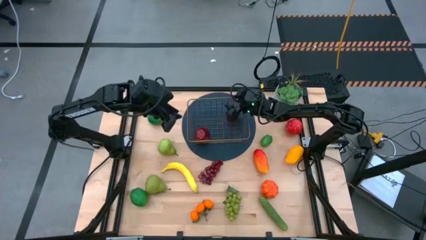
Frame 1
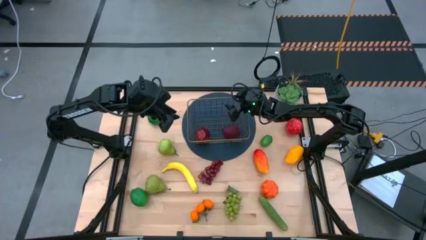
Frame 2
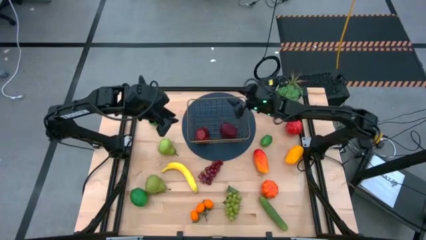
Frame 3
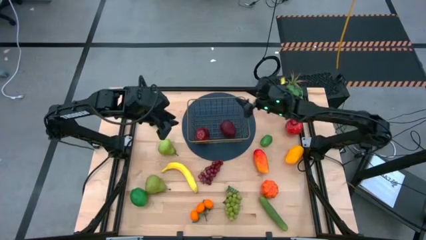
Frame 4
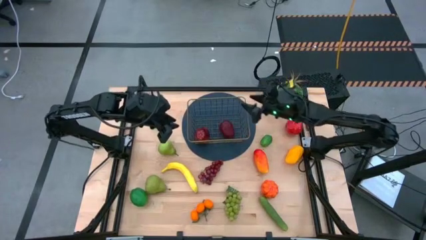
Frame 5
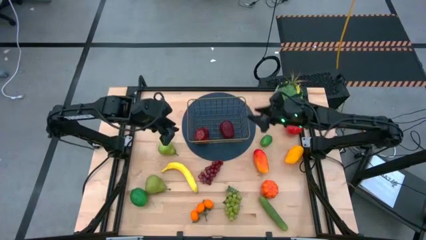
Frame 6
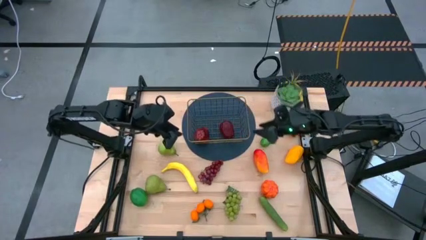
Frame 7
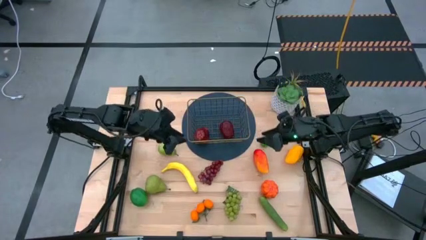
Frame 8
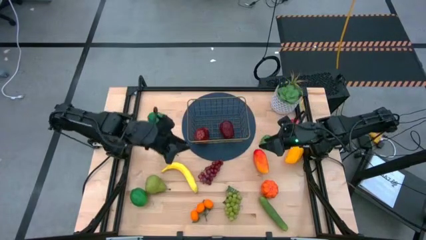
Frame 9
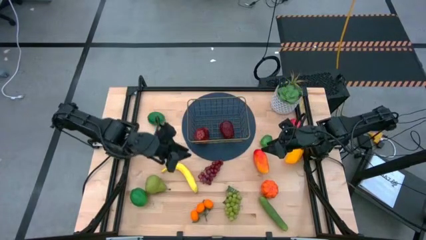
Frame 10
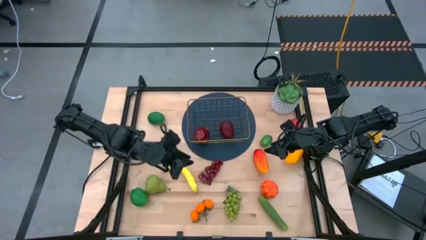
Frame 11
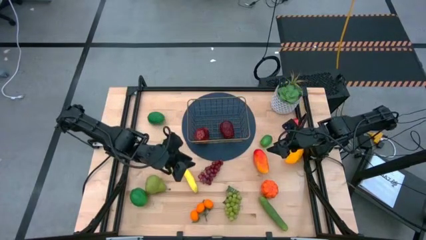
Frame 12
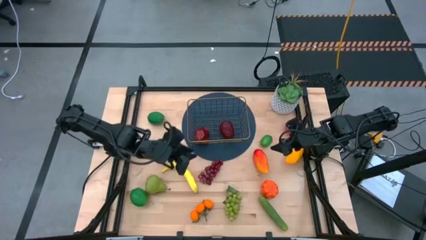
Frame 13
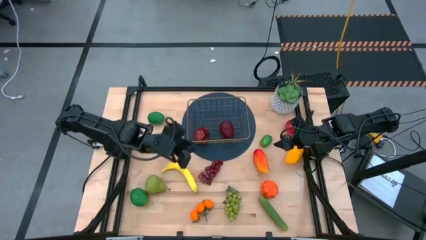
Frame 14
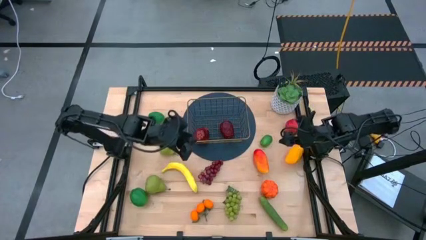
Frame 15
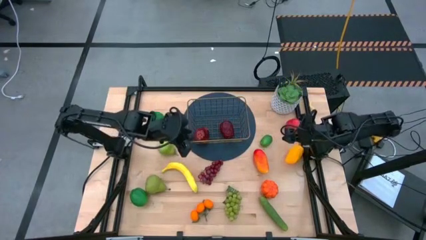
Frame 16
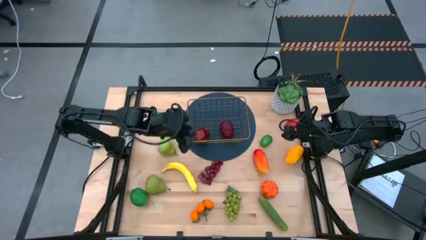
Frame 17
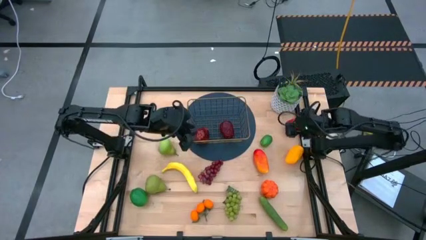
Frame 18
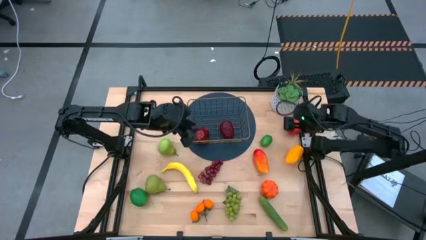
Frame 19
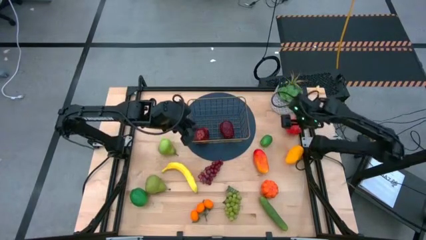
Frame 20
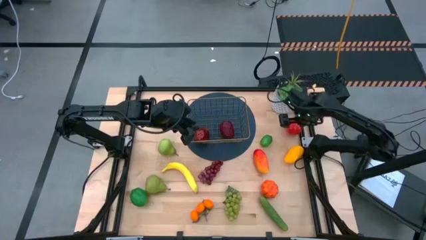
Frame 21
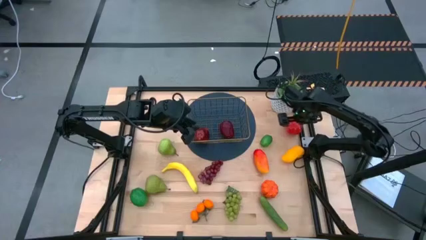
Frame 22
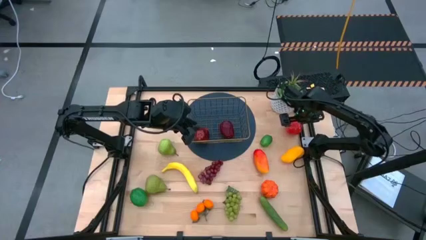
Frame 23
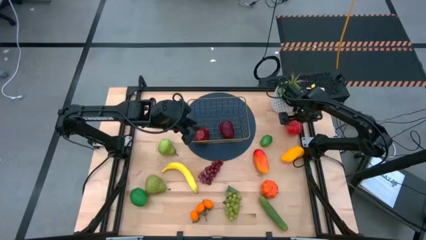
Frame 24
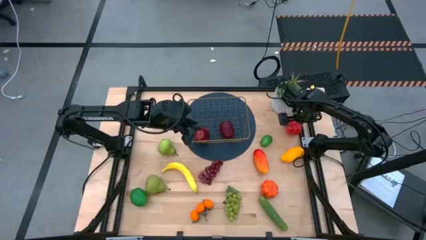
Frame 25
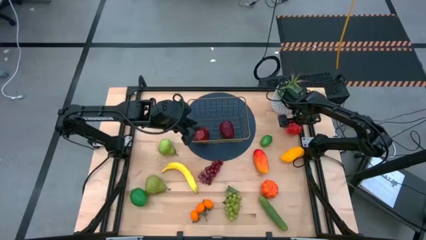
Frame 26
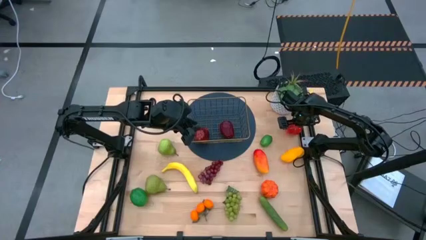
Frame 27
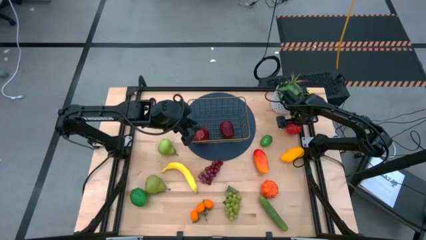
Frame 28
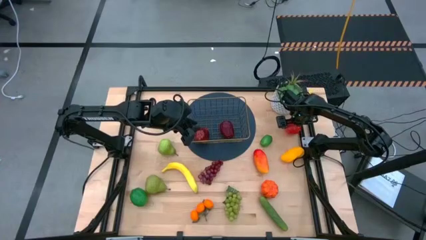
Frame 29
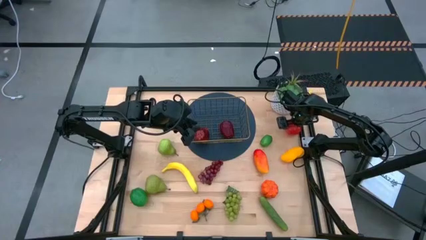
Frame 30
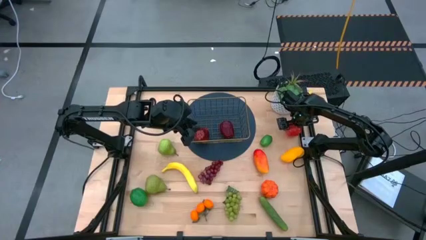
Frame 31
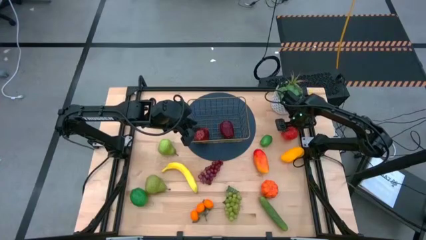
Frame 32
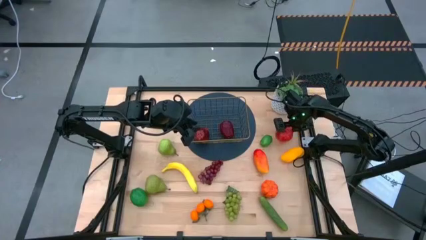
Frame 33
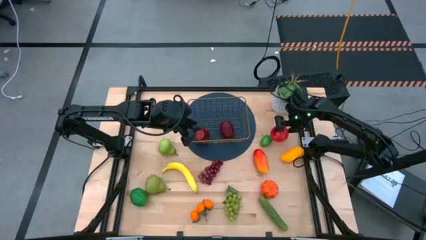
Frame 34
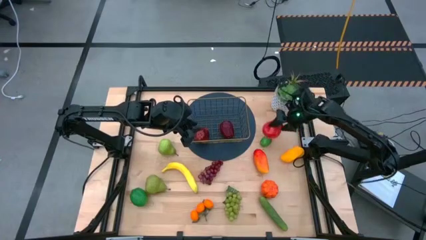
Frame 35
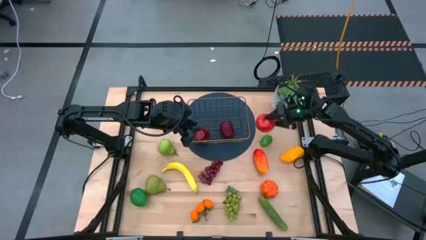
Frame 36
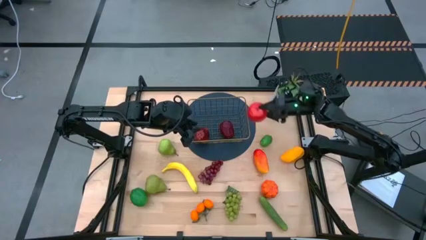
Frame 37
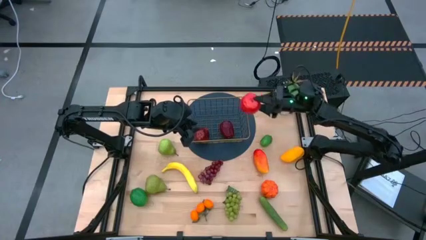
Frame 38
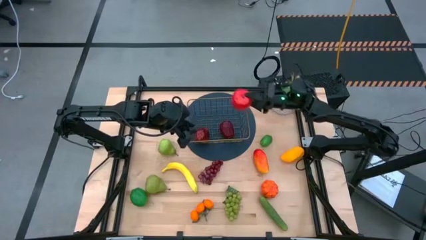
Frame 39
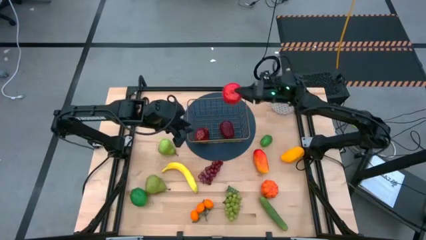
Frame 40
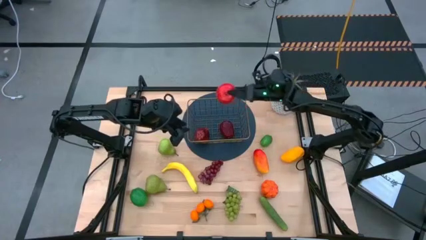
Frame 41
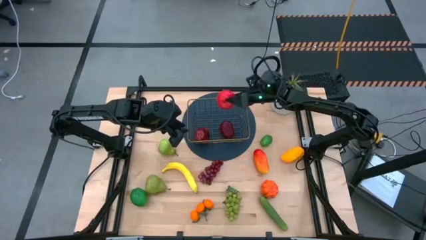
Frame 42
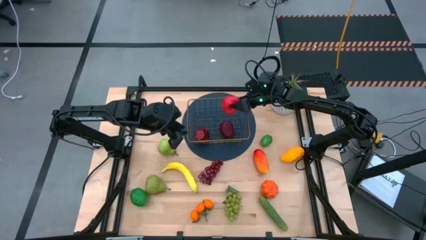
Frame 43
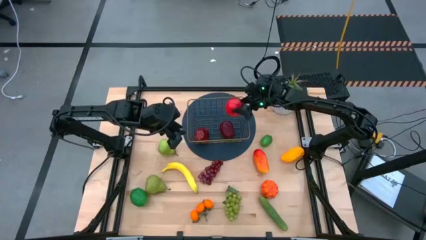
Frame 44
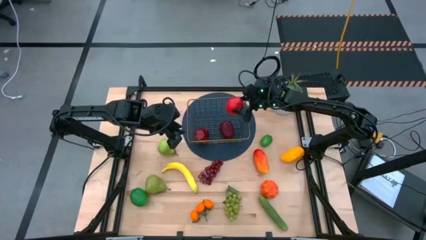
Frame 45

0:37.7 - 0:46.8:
Task: Build produce basket
Put the red apple into the wire basket

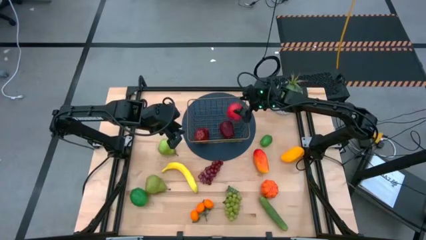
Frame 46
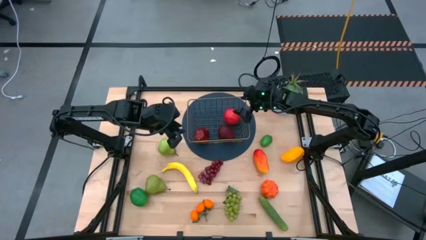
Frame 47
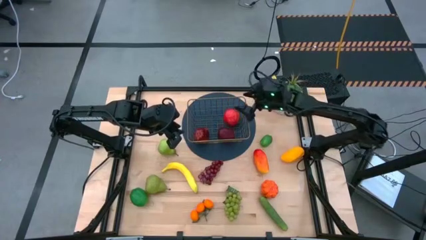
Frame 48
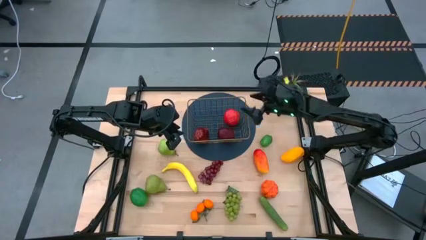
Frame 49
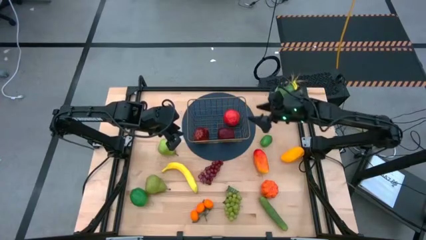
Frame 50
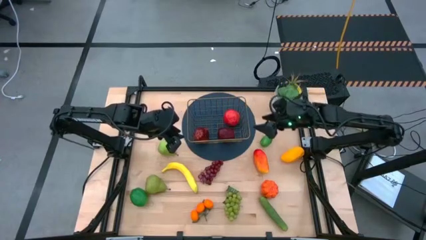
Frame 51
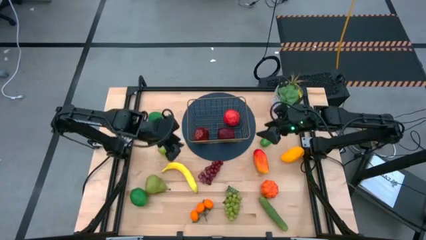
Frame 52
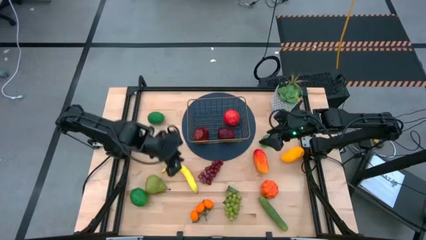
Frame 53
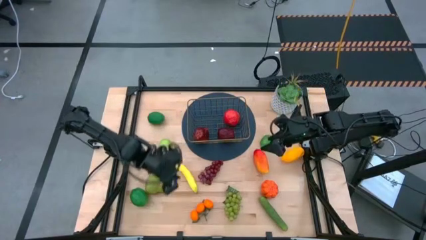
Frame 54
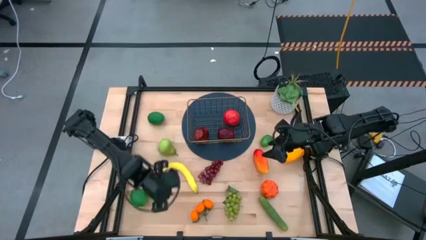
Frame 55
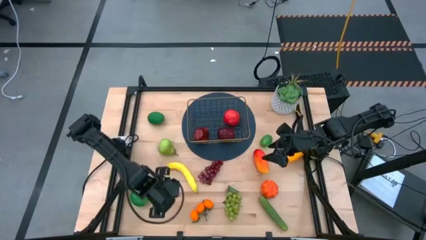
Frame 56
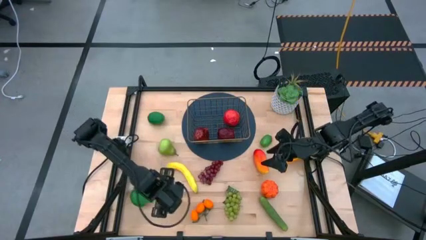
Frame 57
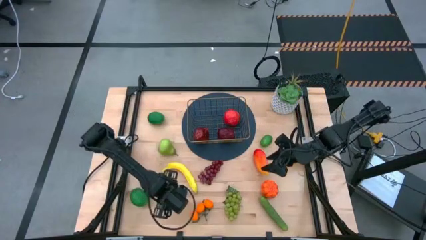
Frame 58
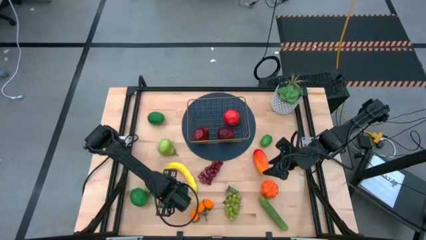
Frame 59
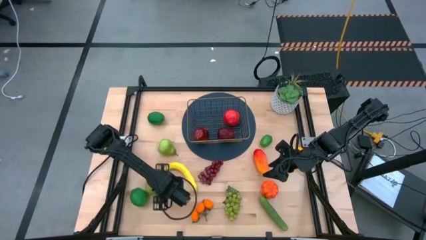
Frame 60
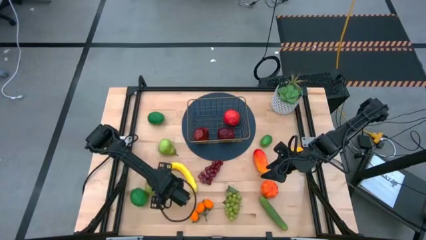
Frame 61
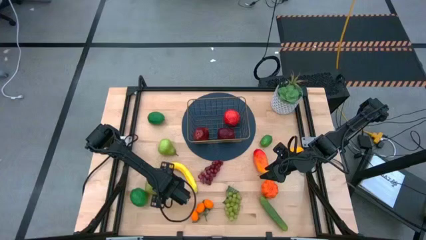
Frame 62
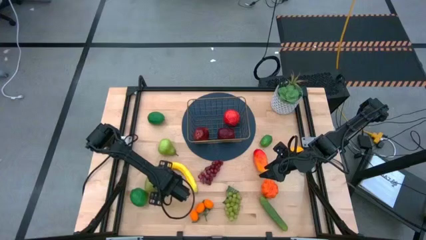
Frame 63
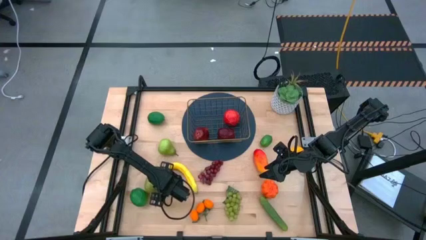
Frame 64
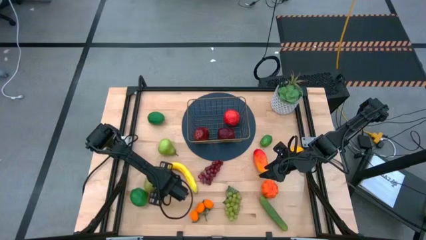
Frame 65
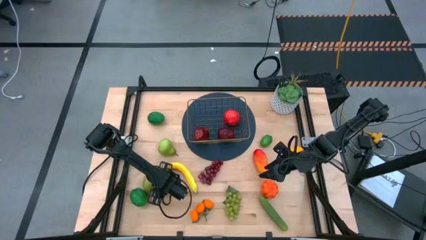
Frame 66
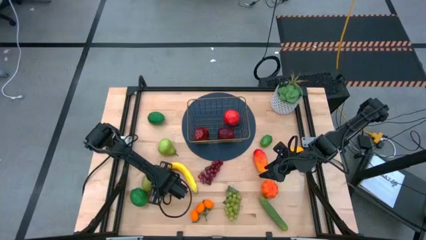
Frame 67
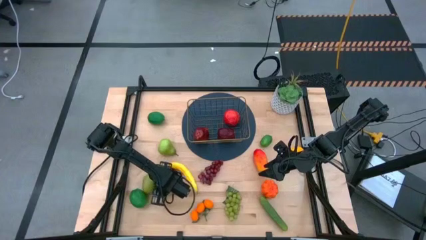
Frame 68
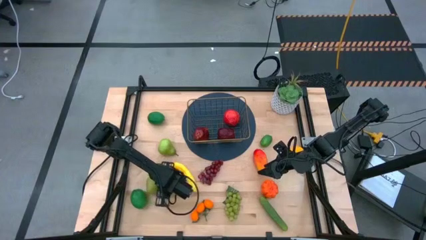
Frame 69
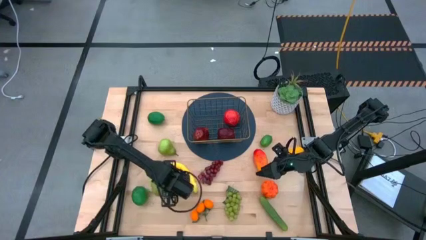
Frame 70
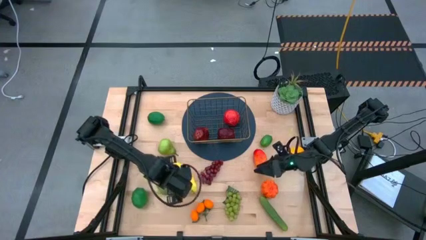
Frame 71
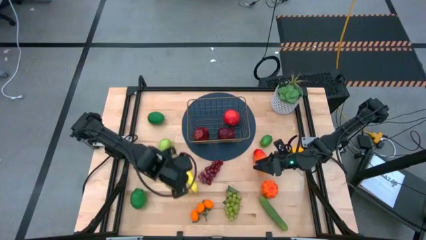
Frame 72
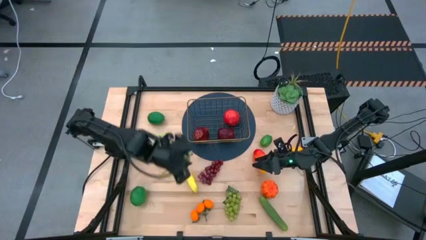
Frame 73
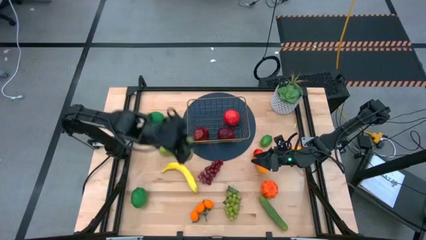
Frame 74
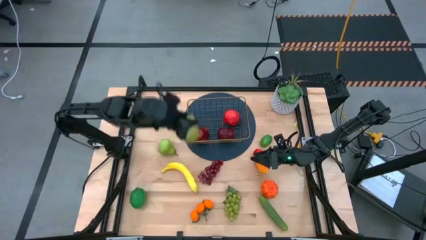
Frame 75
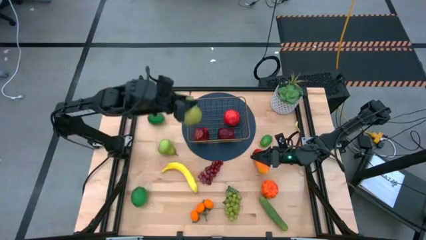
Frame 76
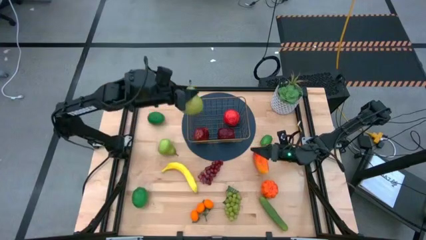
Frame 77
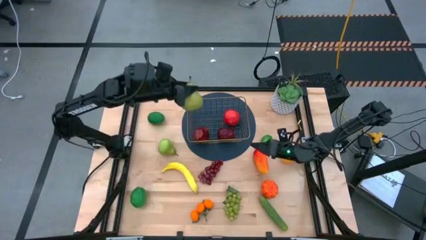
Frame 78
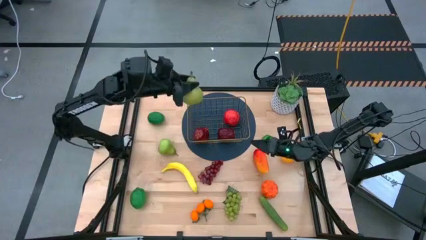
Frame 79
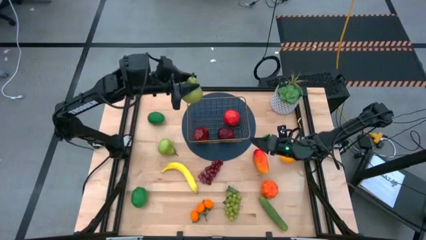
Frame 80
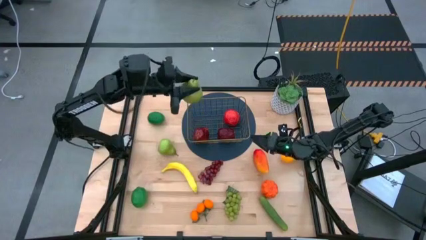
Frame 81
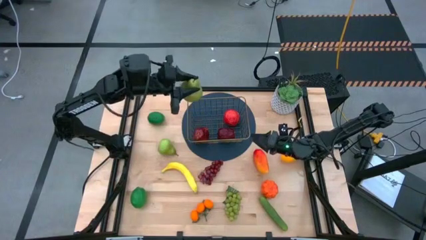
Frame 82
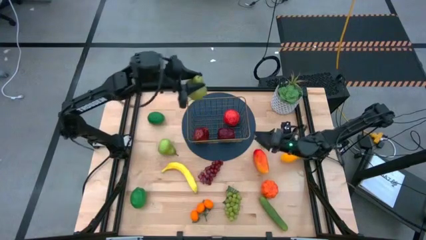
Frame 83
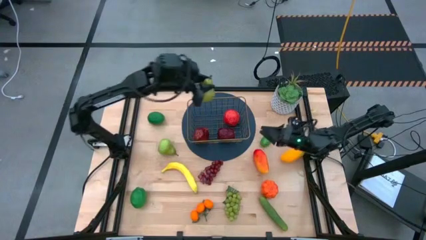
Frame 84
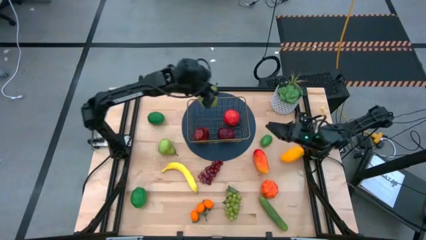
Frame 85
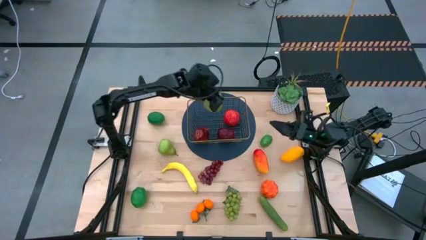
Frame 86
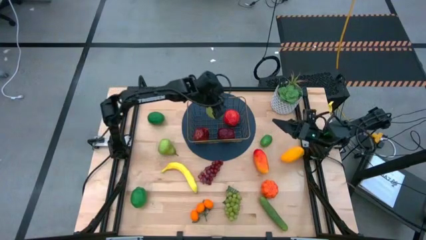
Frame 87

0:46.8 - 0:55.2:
Put the bottom green pear into the wire basket
